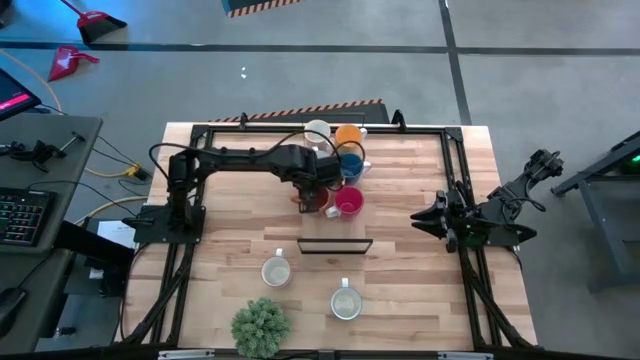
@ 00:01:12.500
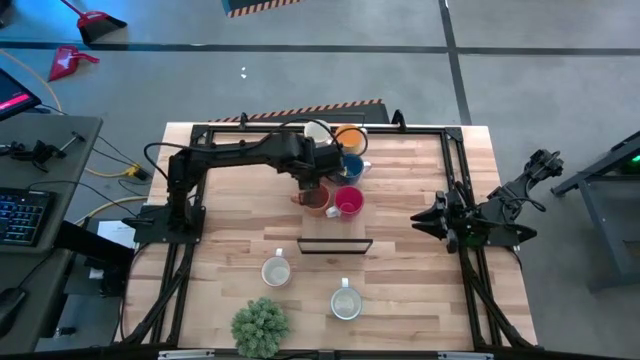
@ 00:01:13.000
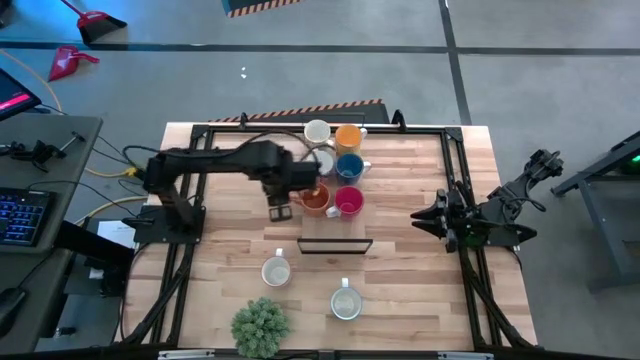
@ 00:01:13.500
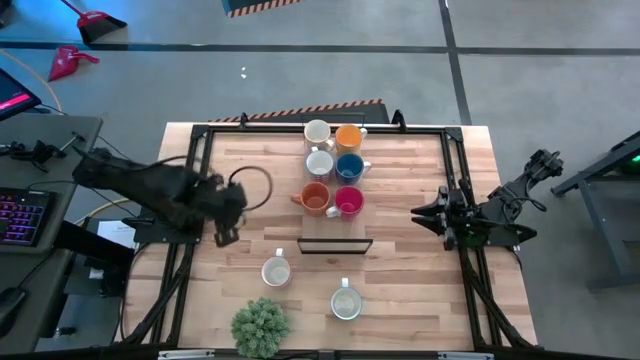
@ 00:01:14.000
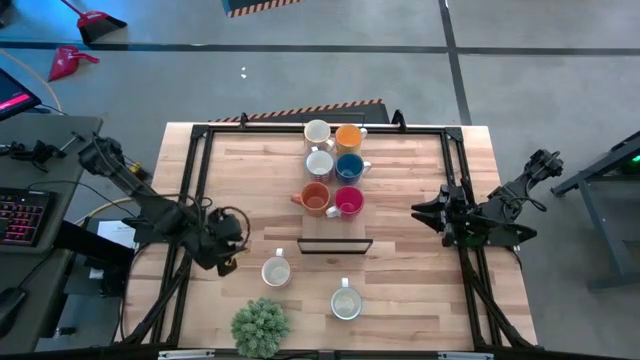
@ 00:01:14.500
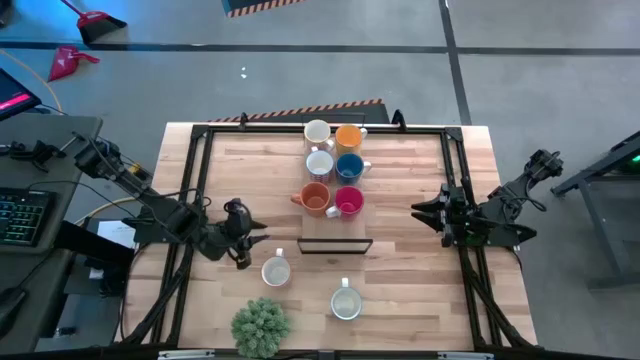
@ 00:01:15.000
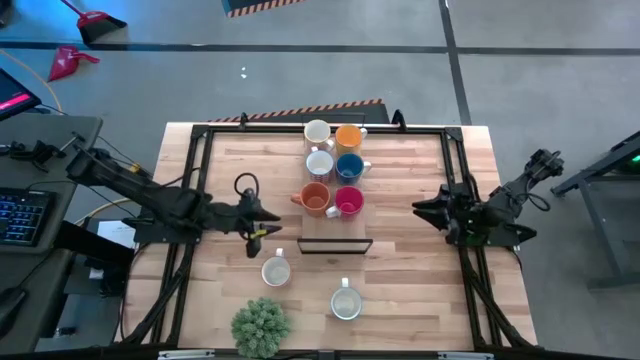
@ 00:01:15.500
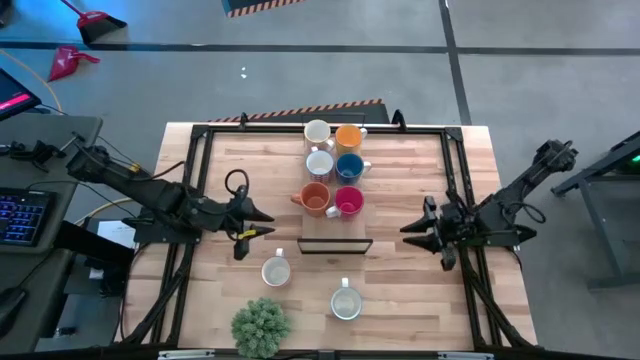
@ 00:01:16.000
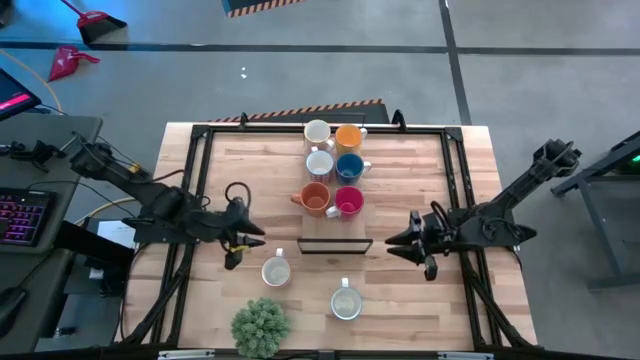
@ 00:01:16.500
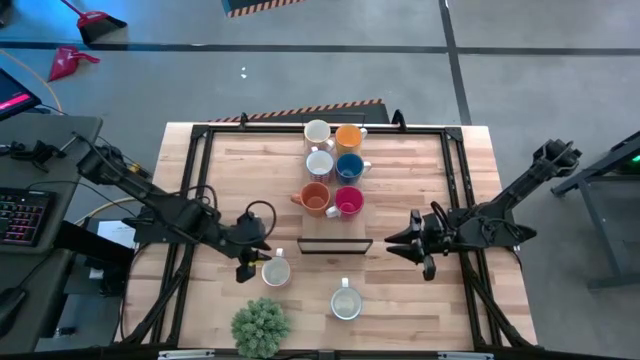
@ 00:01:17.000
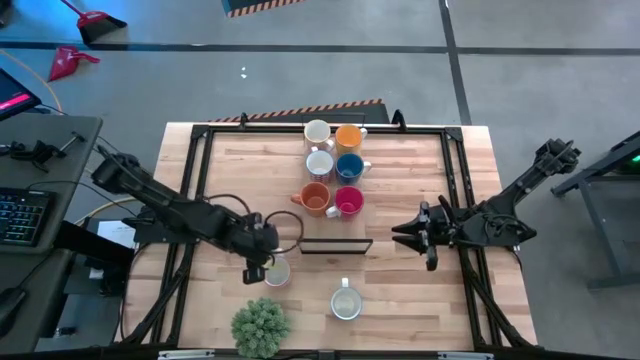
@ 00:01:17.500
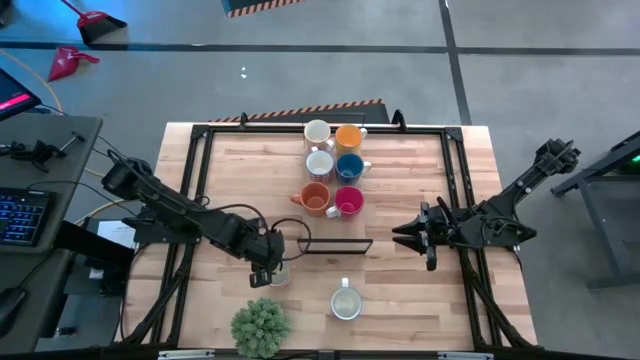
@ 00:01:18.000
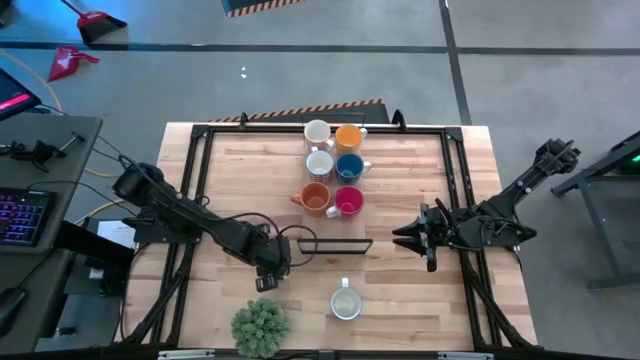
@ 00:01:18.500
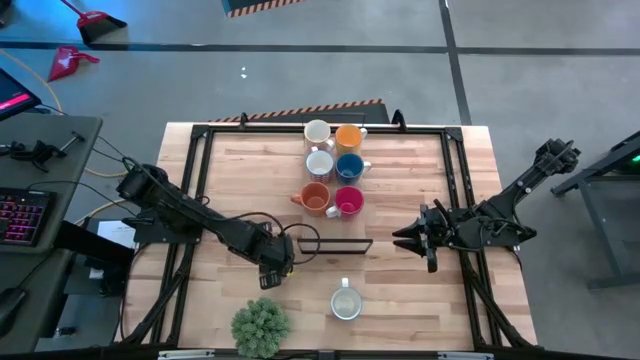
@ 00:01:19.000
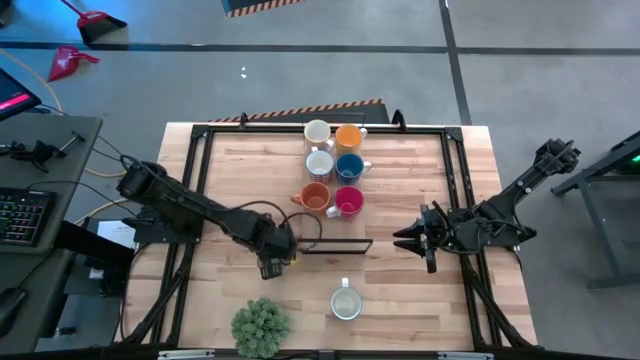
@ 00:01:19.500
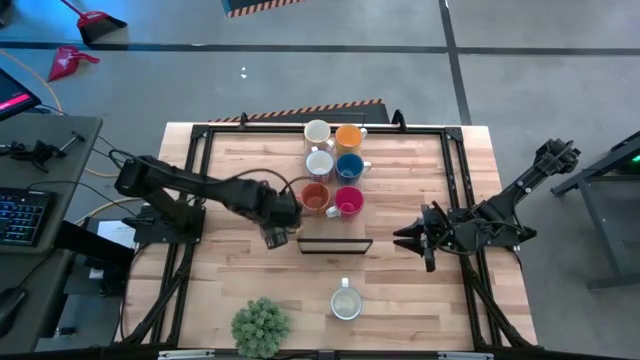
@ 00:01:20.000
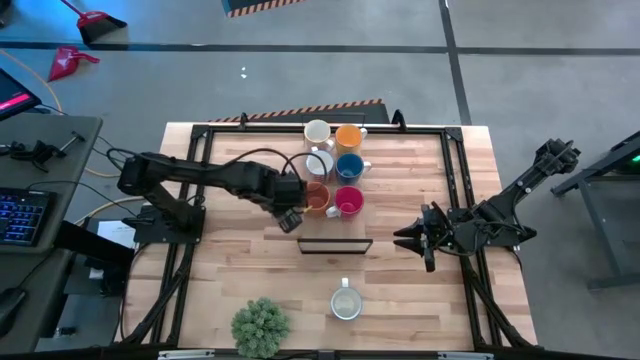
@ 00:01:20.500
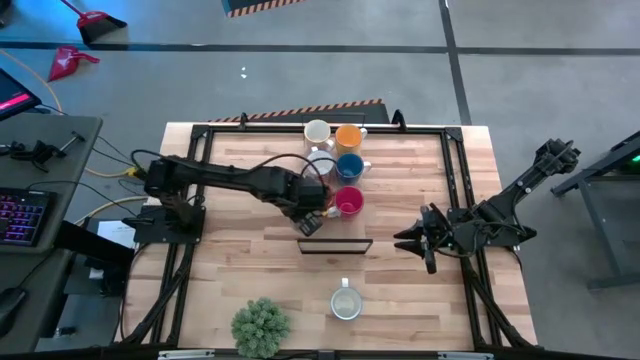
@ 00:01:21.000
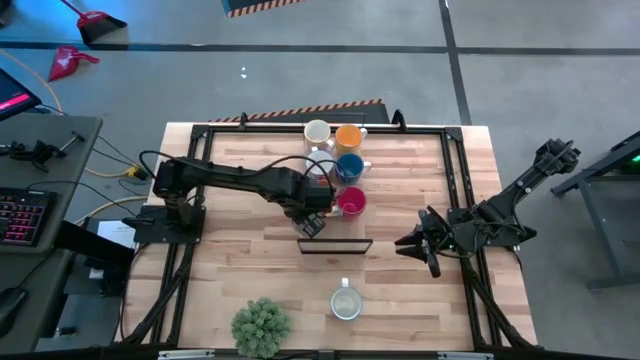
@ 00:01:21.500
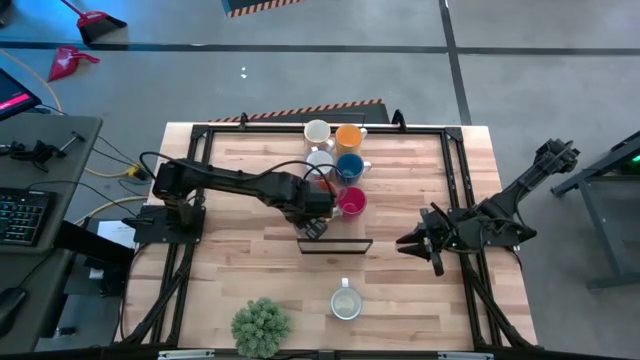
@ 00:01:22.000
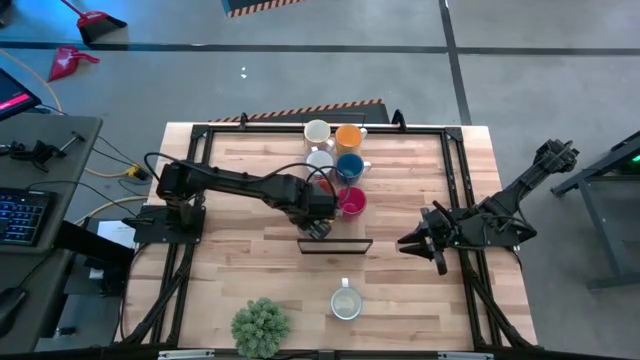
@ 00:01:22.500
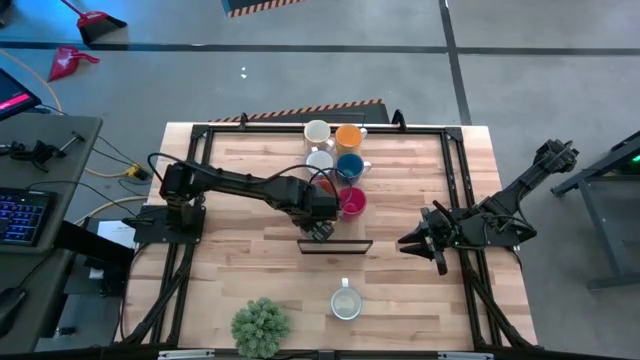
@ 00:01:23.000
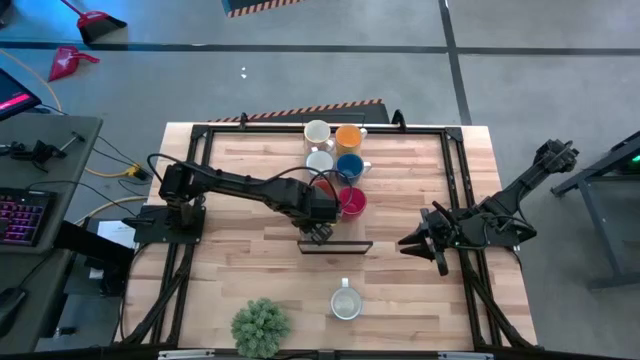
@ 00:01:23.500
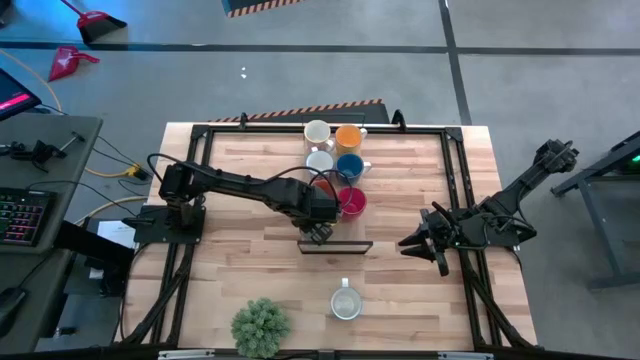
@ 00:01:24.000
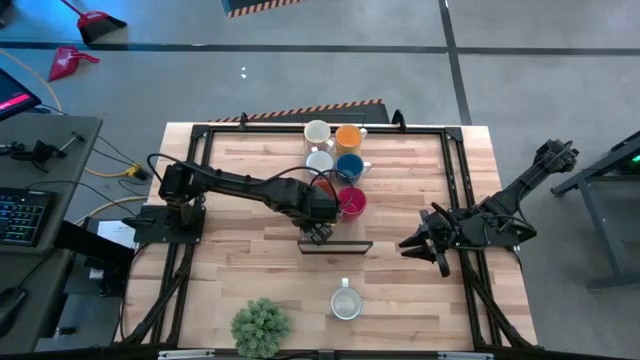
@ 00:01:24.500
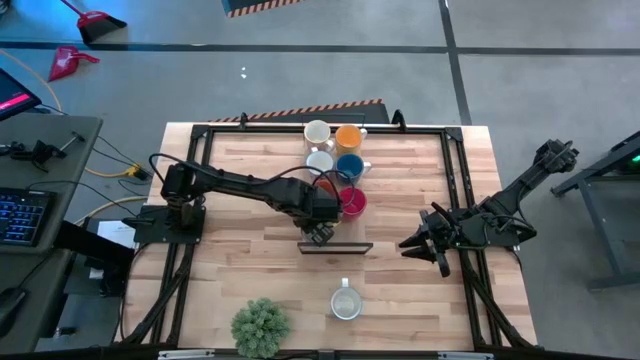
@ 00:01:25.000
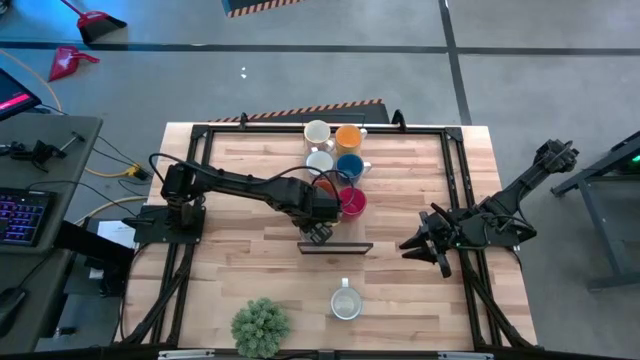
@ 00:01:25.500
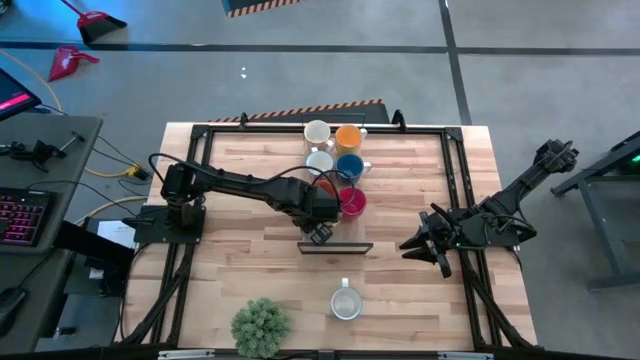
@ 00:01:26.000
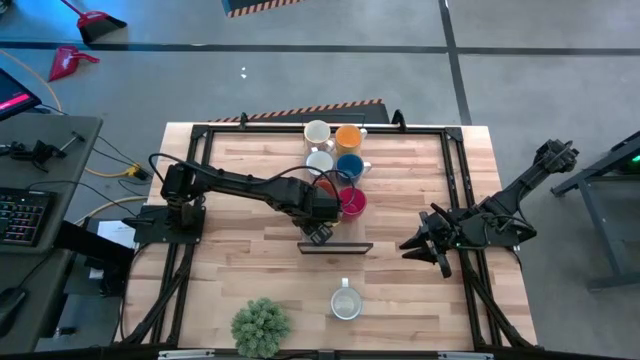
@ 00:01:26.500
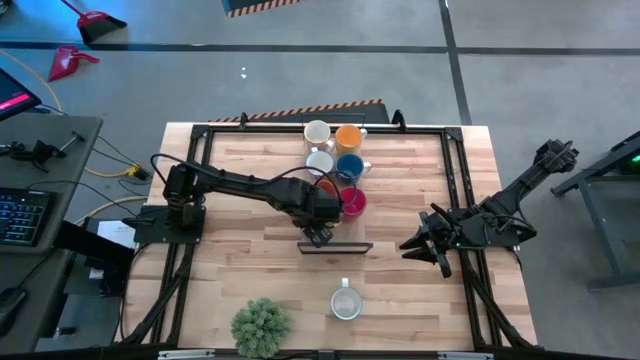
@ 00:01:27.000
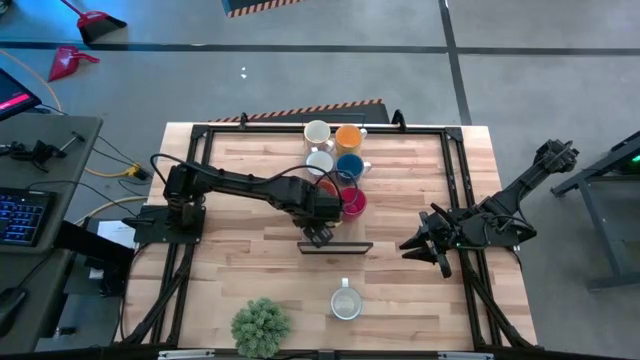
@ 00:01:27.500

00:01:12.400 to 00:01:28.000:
Task: Place coffee mugs
Put the gray cup on the shelf
